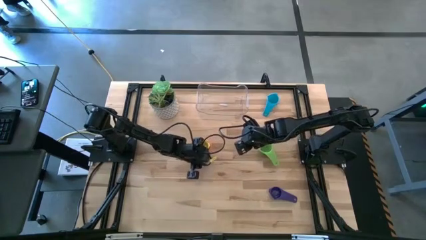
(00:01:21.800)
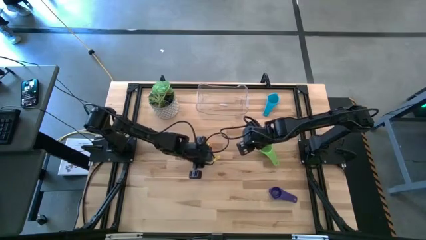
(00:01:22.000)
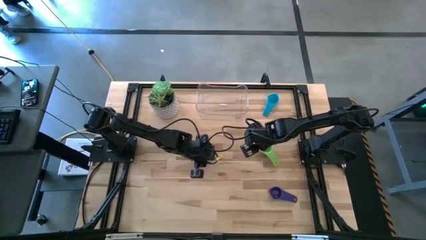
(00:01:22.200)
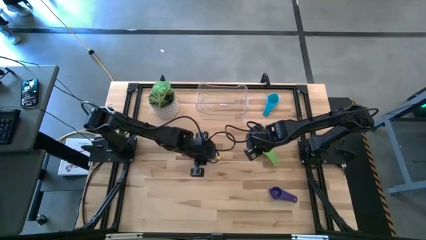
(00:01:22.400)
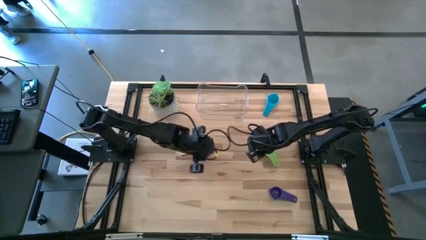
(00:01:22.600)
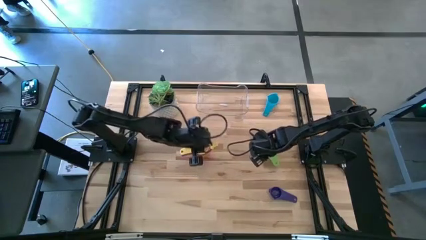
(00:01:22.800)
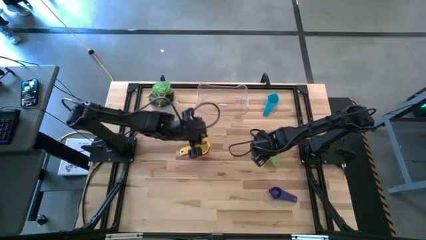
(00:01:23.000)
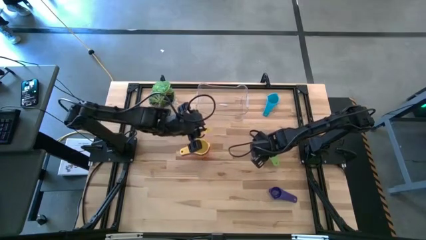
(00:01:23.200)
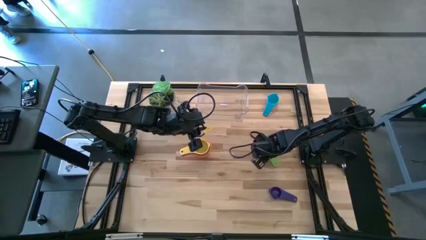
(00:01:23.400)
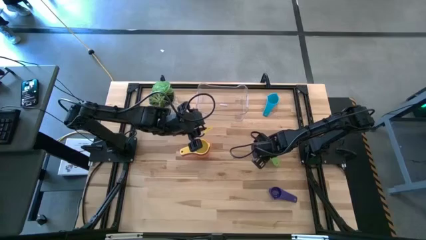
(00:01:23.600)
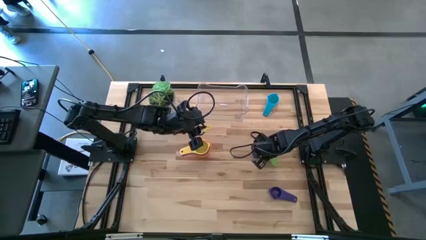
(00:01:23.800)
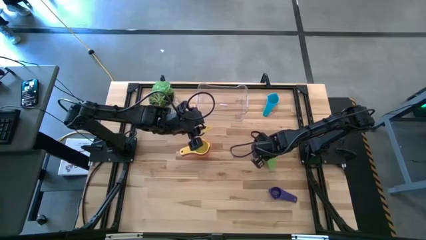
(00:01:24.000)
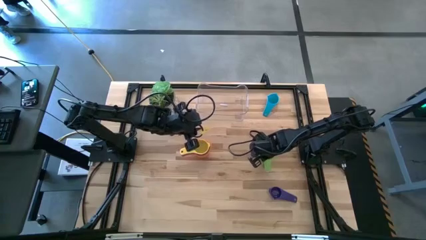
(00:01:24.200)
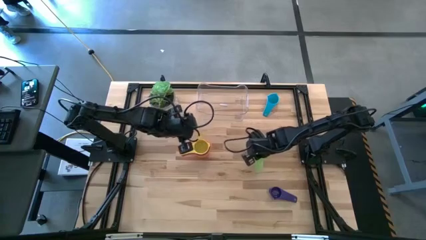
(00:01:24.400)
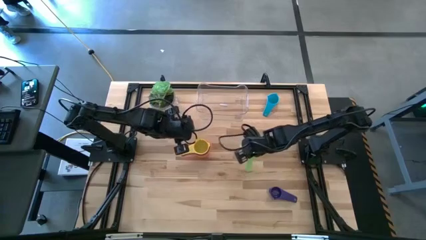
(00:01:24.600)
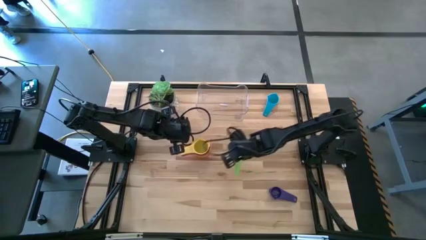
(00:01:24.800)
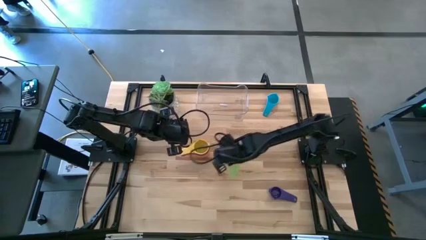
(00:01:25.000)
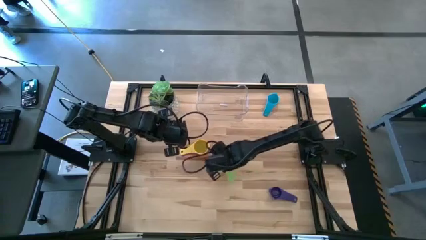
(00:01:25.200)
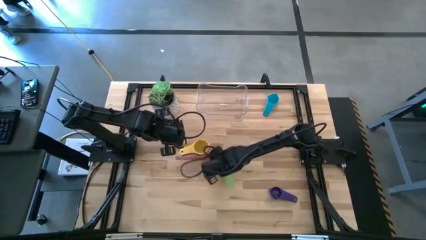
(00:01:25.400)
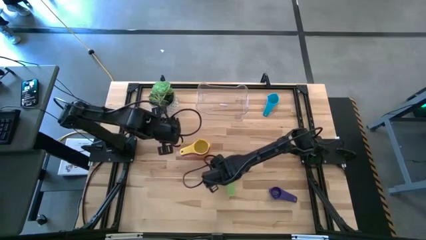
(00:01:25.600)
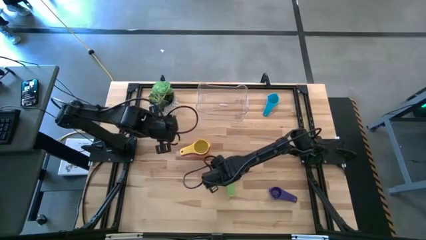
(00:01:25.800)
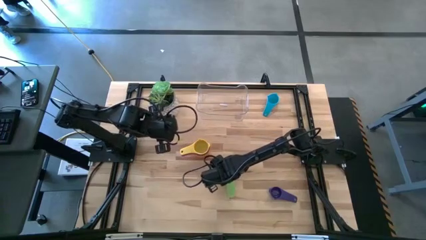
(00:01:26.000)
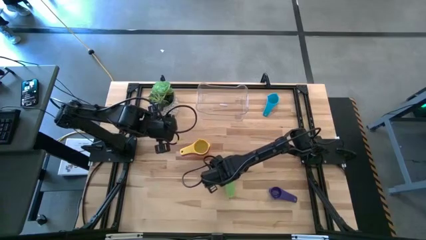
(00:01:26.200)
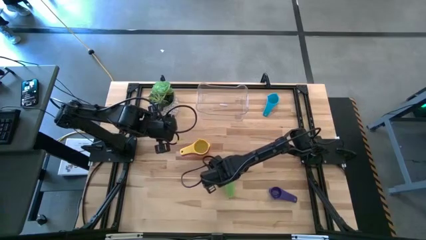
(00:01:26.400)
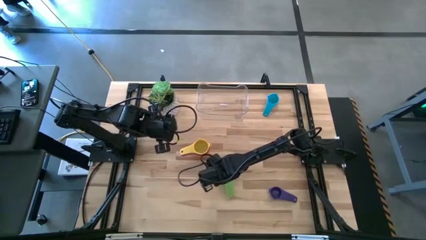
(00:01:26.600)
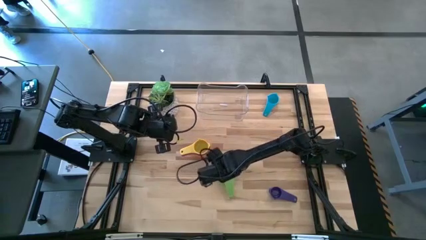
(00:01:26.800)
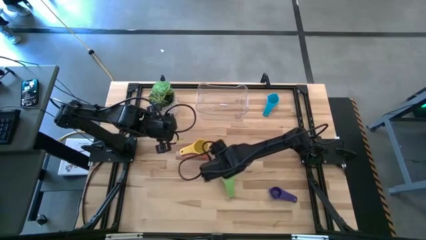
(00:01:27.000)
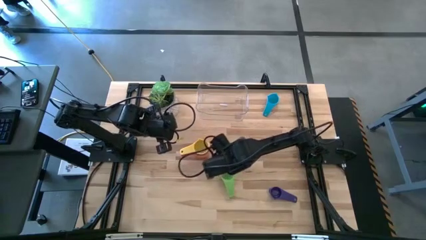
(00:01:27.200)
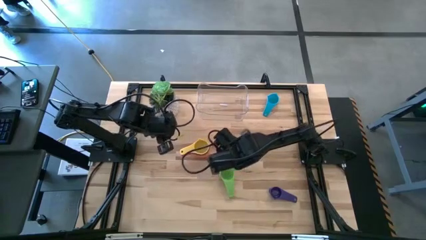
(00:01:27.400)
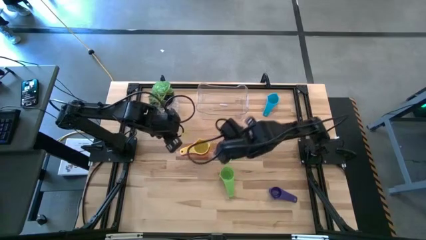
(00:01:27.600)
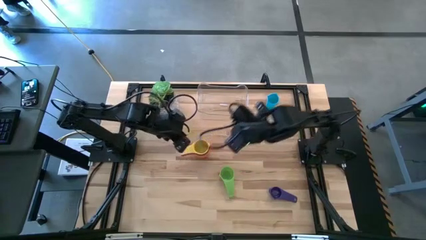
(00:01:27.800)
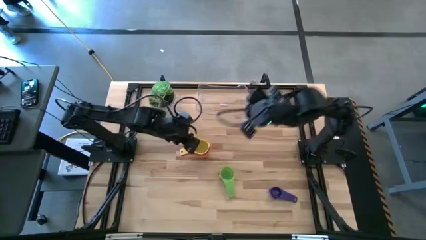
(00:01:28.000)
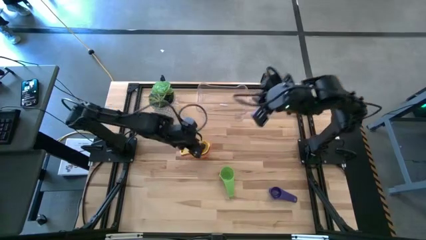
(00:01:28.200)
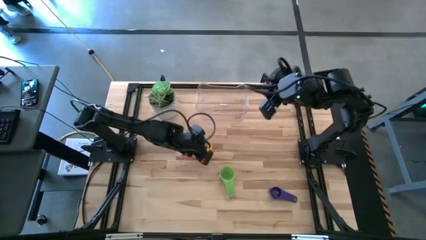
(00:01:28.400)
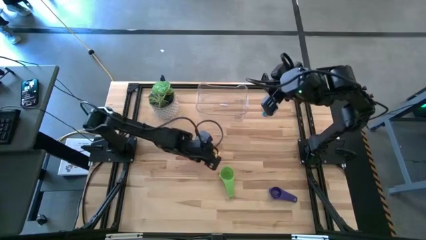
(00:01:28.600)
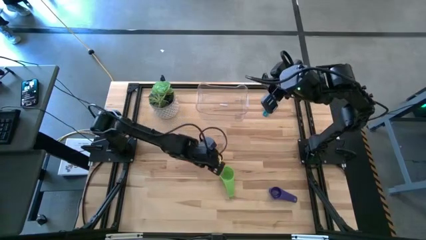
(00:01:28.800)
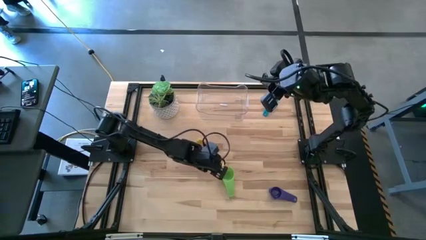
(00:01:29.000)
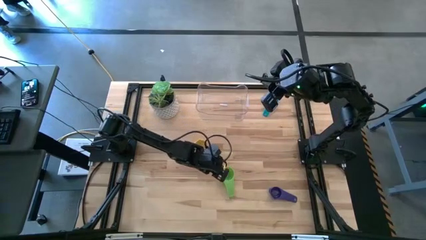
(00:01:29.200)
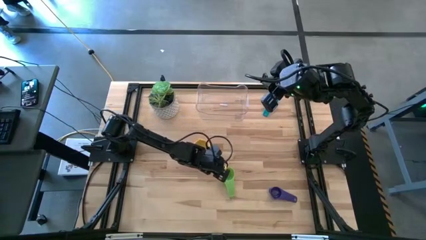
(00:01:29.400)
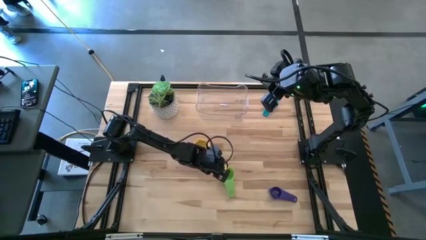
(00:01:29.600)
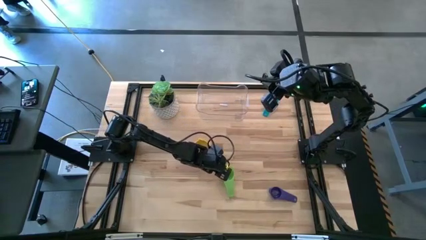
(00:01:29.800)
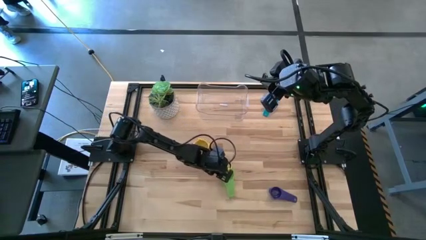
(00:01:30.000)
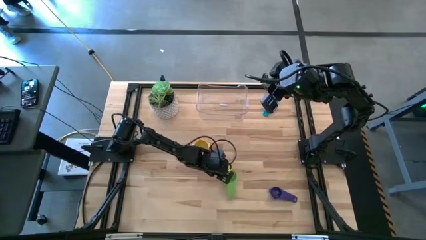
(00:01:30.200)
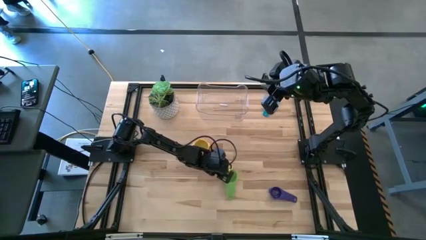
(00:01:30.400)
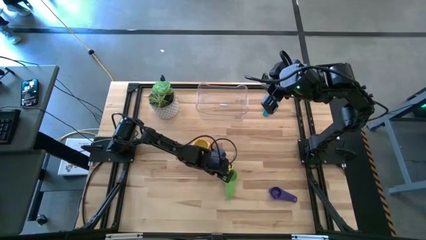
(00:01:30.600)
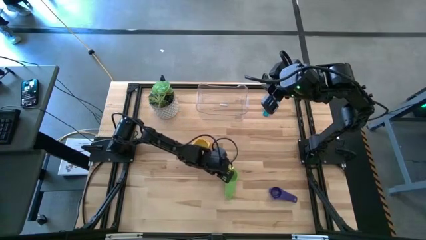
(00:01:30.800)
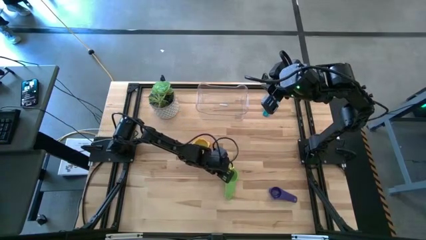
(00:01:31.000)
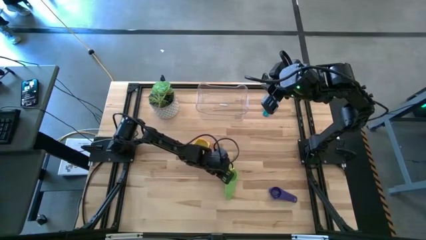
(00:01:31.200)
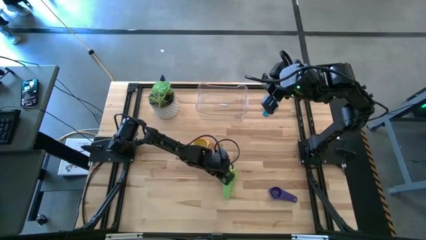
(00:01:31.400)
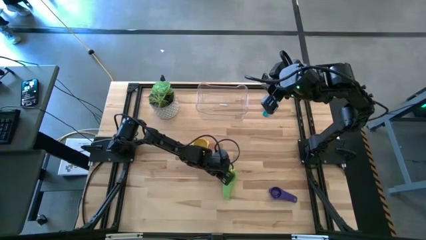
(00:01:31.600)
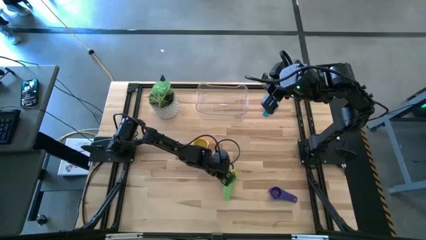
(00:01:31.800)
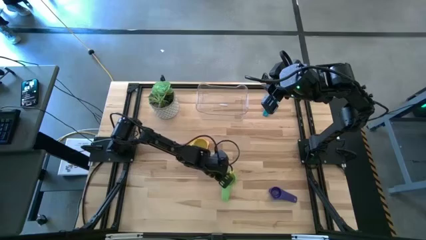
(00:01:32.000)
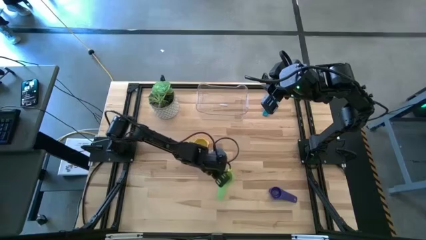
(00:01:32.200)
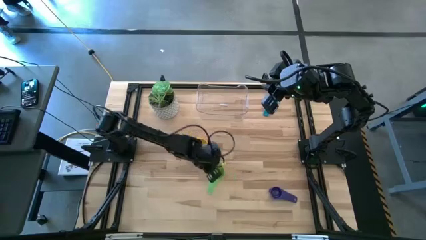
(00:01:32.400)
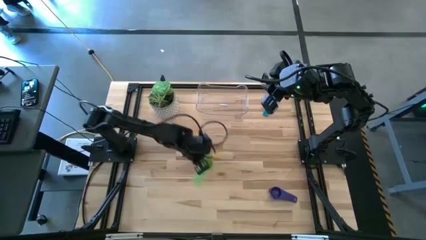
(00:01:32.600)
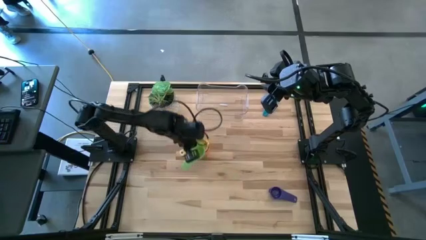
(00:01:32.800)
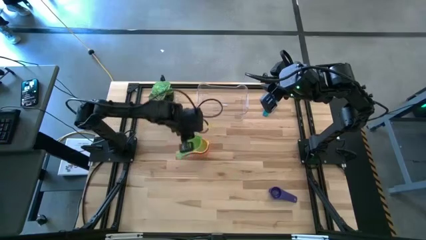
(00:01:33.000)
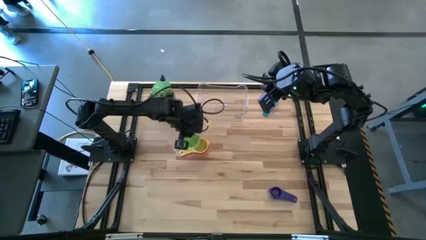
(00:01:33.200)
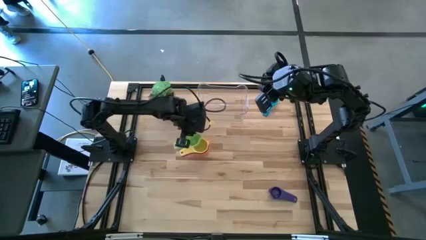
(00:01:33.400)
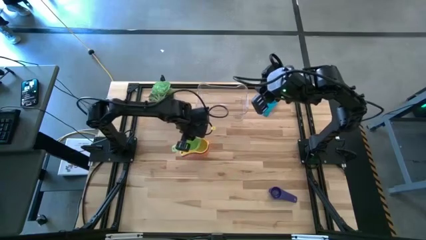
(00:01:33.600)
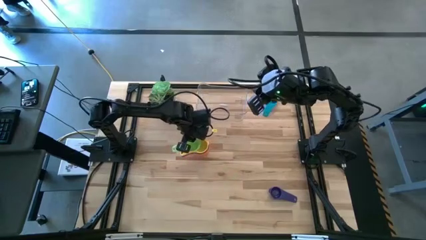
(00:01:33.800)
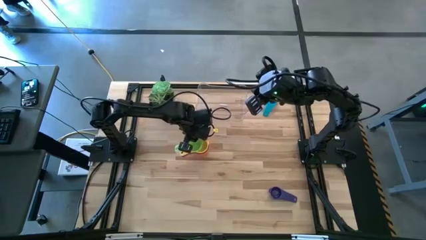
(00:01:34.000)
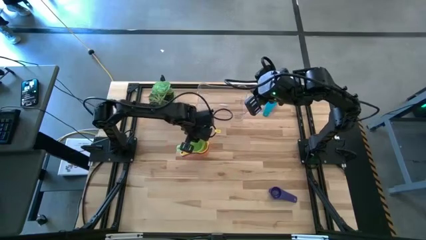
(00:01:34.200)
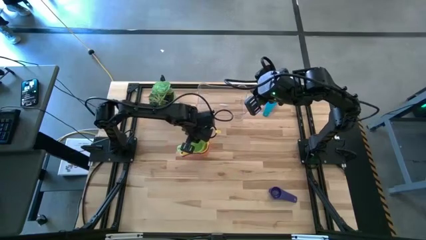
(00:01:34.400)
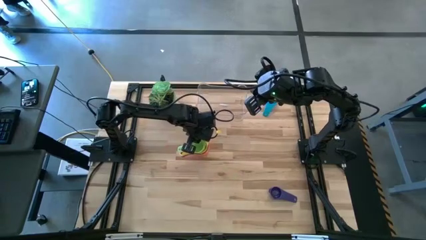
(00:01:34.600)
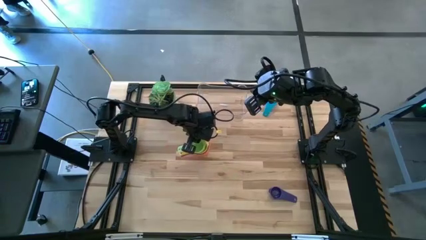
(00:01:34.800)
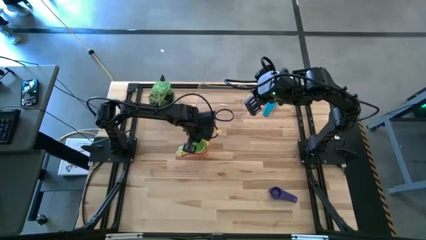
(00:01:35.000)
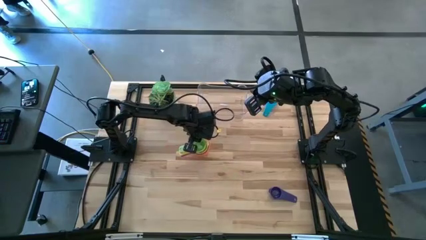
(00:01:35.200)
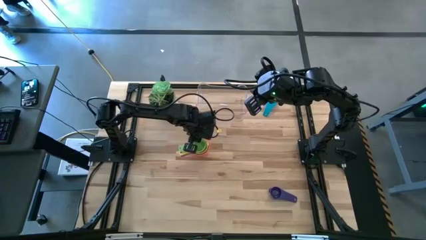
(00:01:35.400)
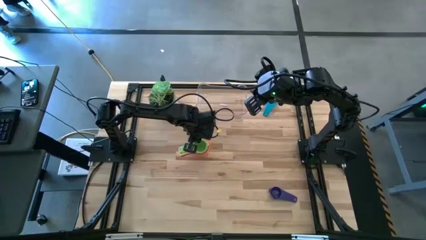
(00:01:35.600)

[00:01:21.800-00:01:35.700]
Task: Nest measuring cups in basket
Stack the green measuring cup on top of the yellow measuring cup

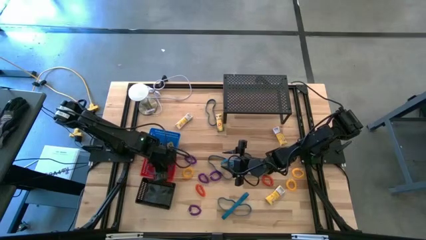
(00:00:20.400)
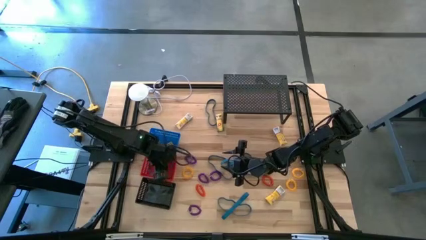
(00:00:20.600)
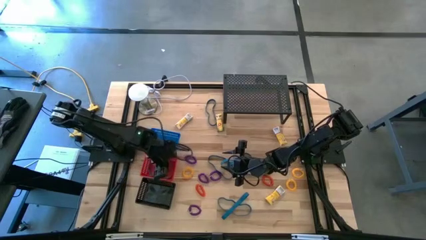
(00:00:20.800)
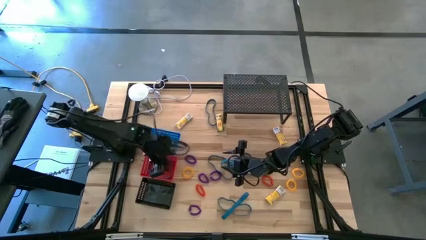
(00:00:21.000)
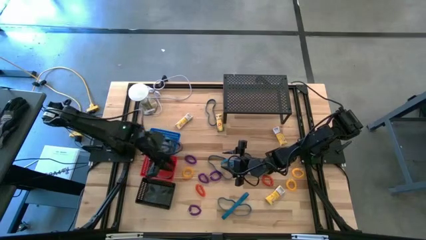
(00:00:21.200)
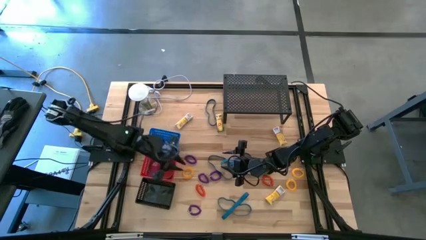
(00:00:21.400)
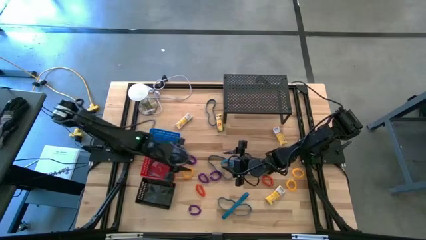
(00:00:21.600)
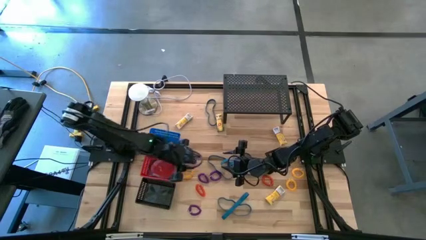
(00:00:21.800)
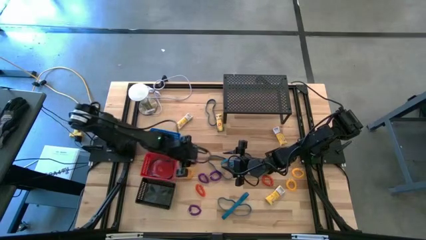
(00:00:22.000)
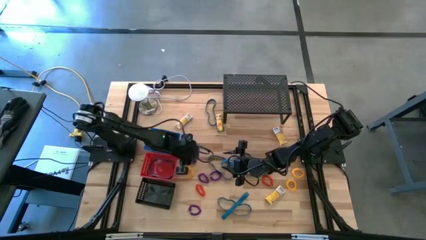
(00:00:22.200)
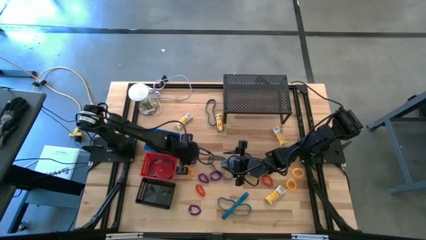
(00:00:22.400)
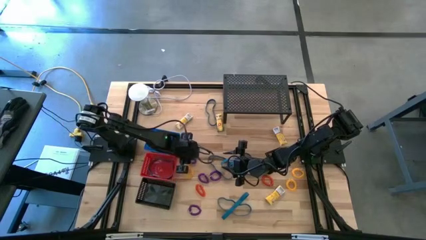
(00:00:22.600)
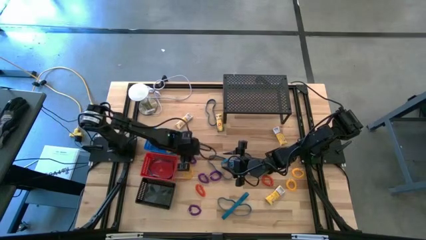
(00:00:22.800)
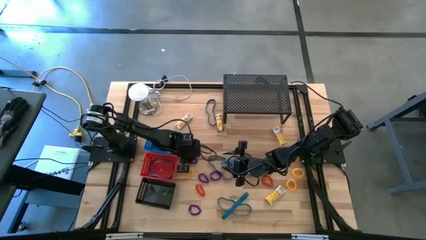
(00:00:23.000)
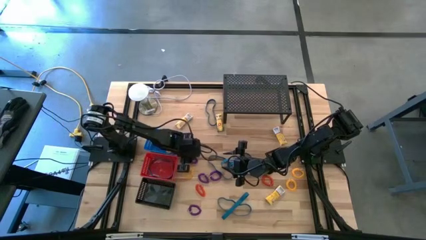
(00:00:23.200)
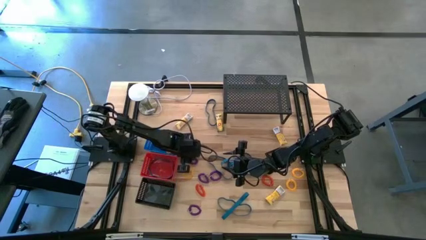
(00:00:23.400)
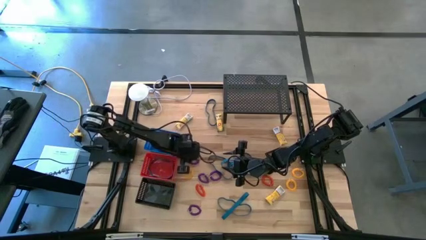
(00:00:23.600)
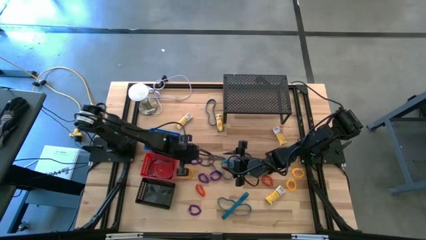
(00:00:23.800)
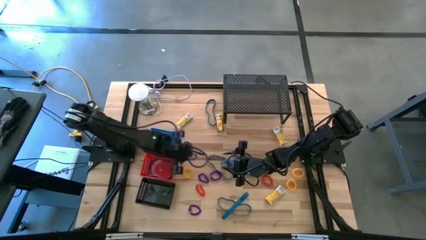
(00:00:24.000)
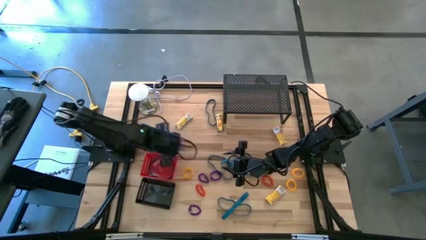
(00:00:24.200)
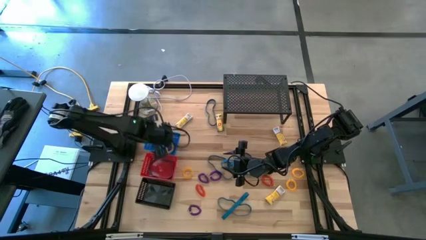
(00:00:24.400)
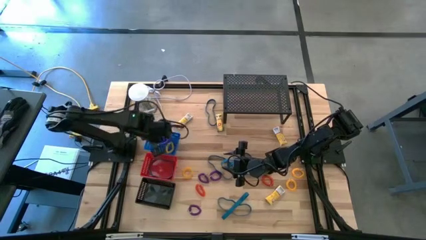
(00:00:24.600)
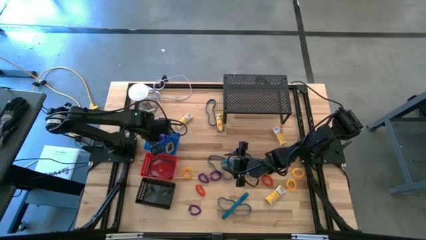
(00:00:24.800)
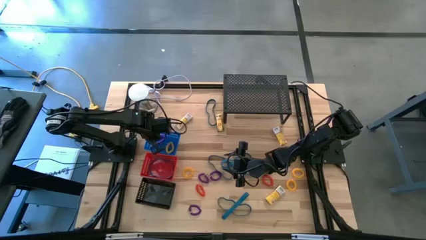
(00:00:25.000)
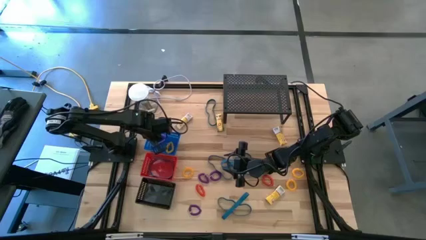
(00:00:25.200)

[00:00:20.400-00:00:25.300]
Task: Pick & Place Office Desk Supplies
Put the purple spring keychain into the blue bin
